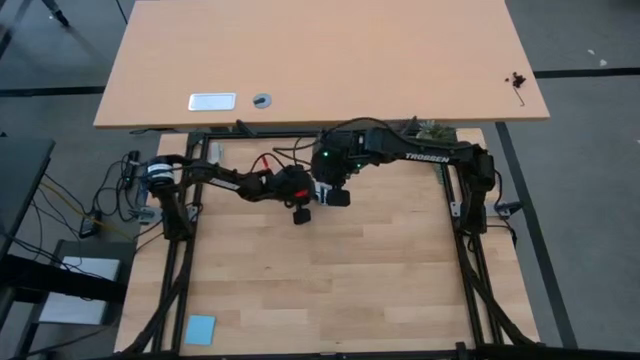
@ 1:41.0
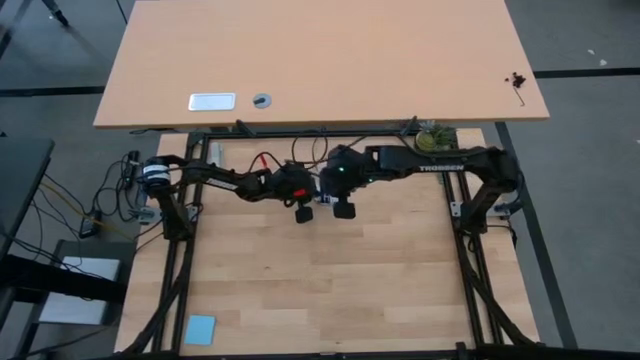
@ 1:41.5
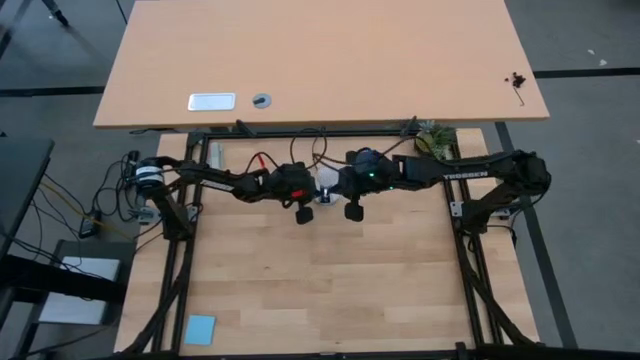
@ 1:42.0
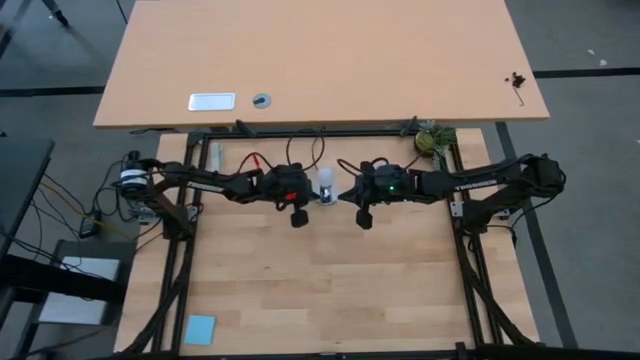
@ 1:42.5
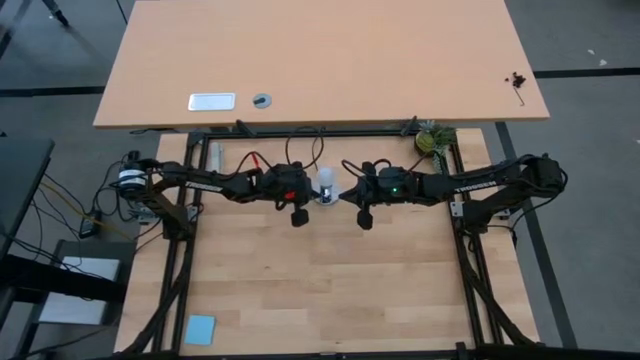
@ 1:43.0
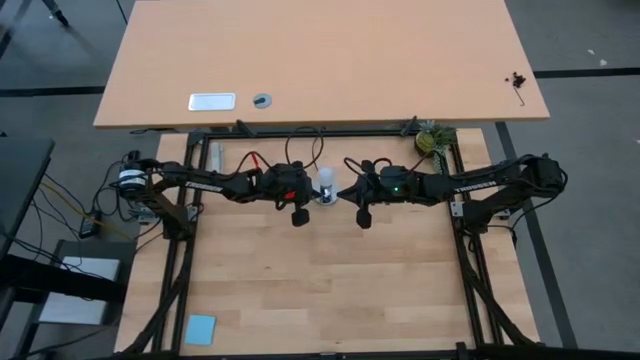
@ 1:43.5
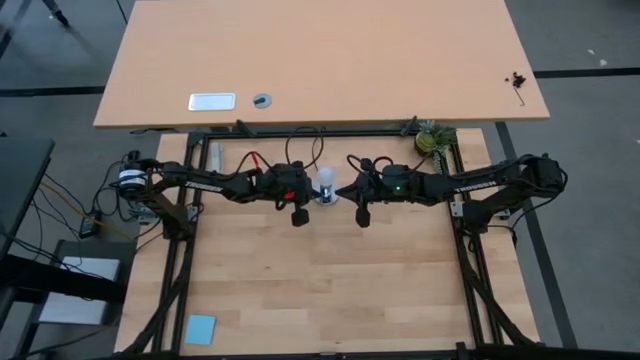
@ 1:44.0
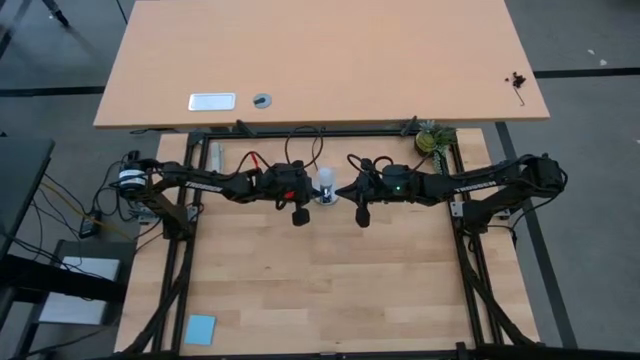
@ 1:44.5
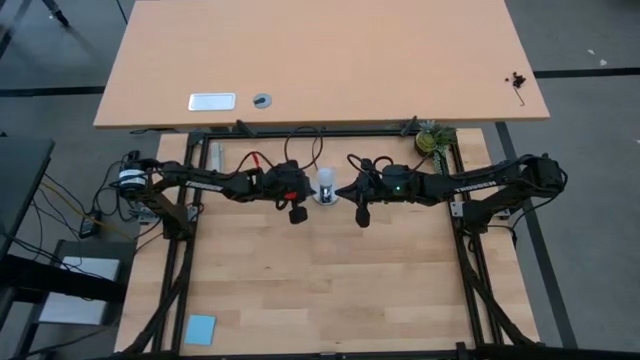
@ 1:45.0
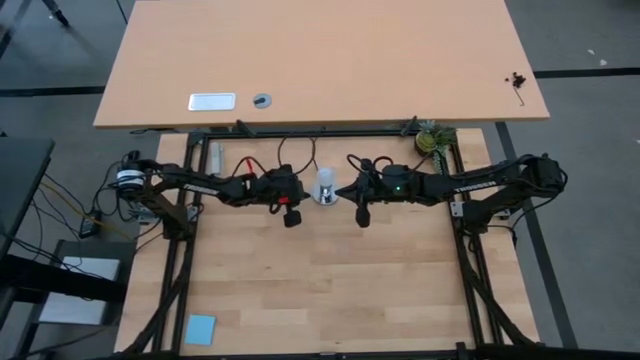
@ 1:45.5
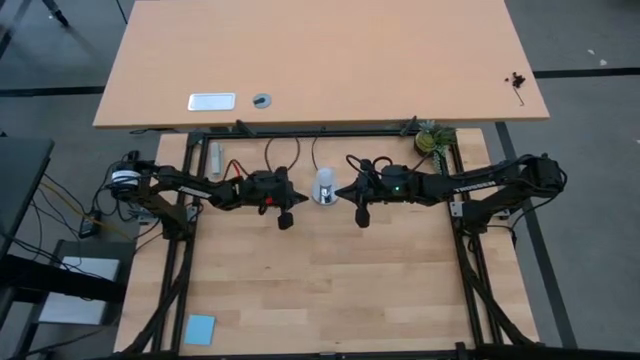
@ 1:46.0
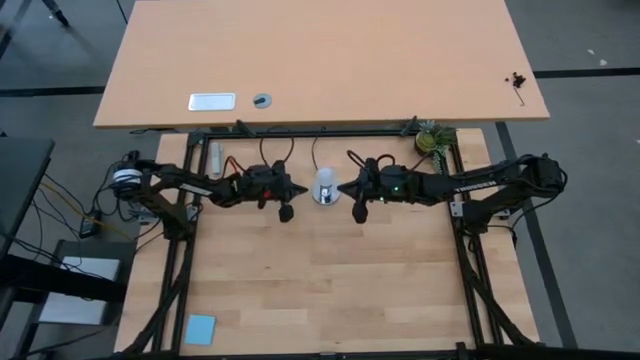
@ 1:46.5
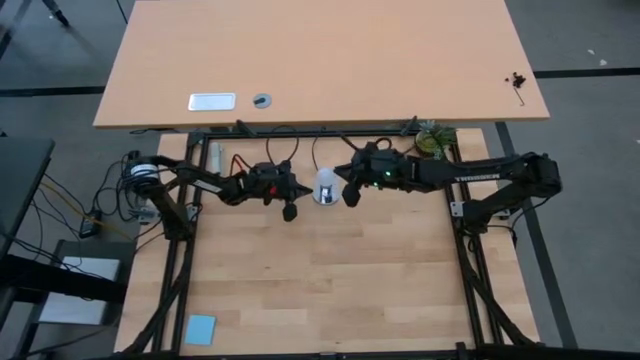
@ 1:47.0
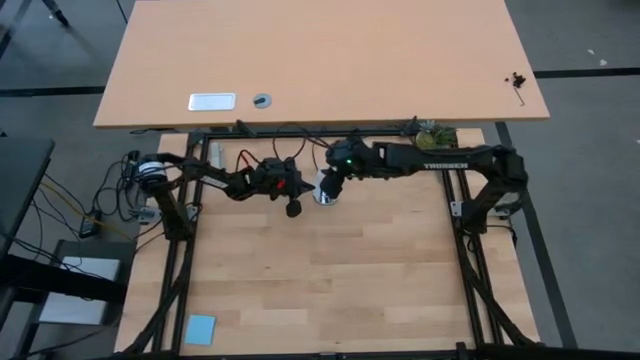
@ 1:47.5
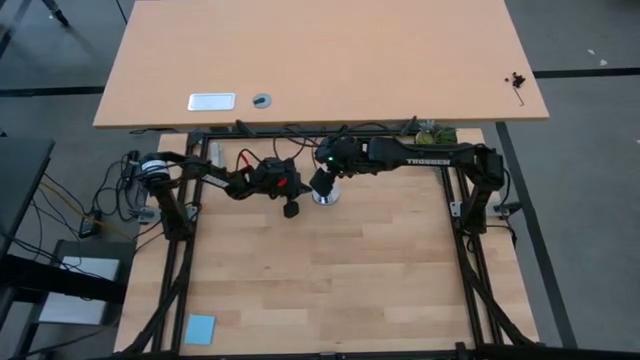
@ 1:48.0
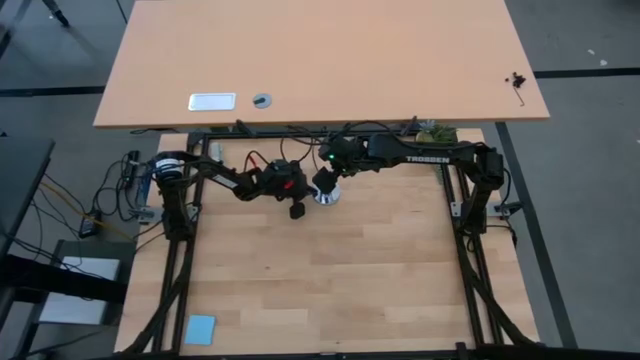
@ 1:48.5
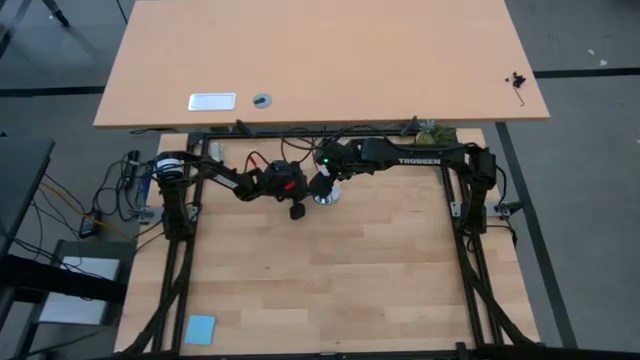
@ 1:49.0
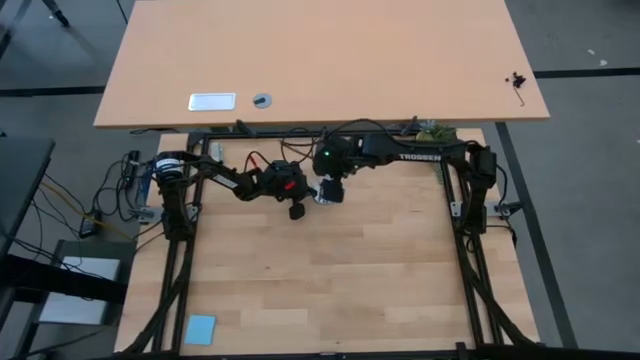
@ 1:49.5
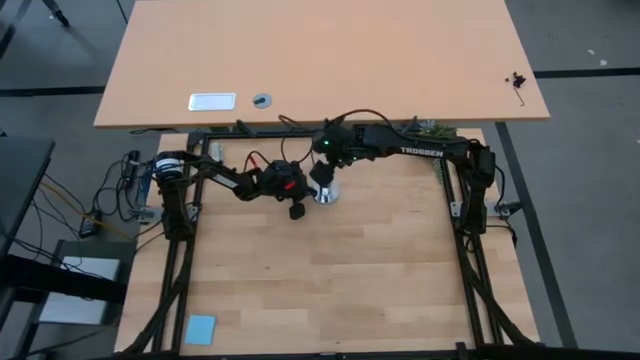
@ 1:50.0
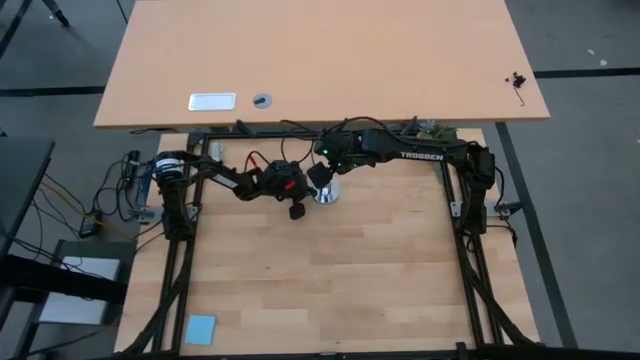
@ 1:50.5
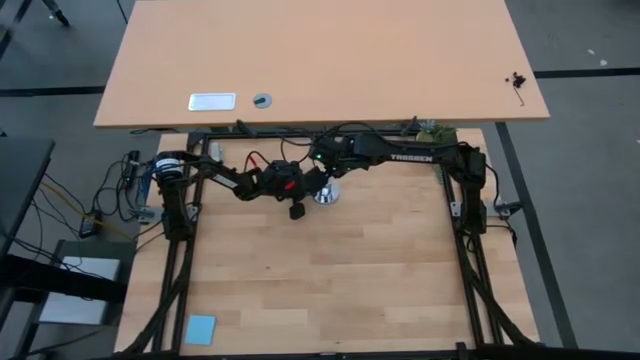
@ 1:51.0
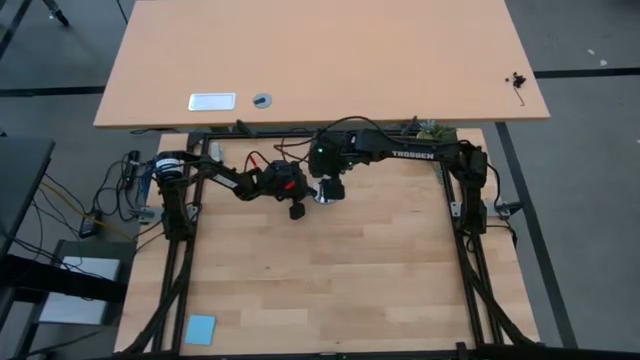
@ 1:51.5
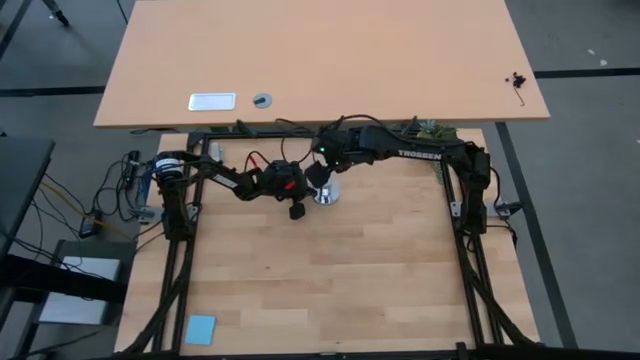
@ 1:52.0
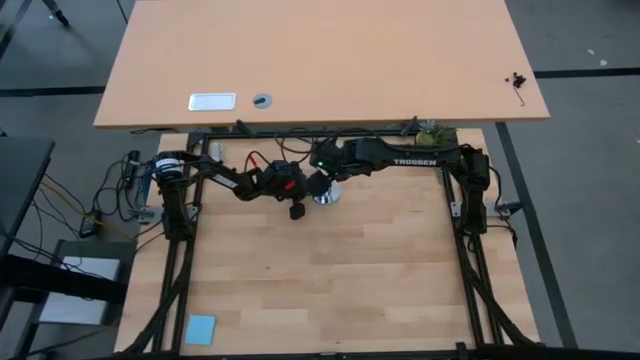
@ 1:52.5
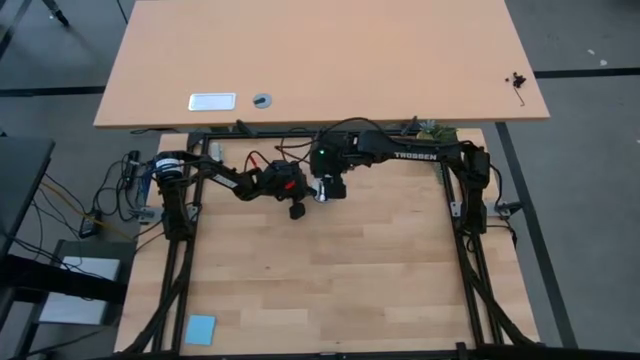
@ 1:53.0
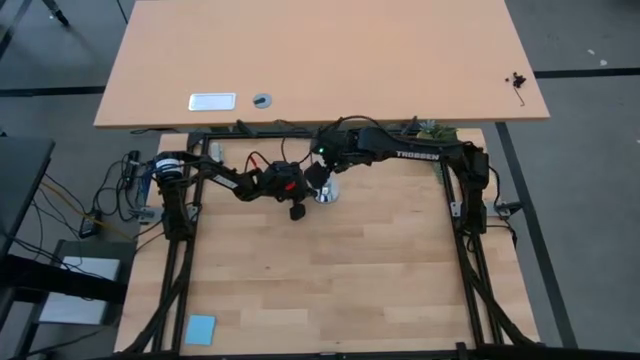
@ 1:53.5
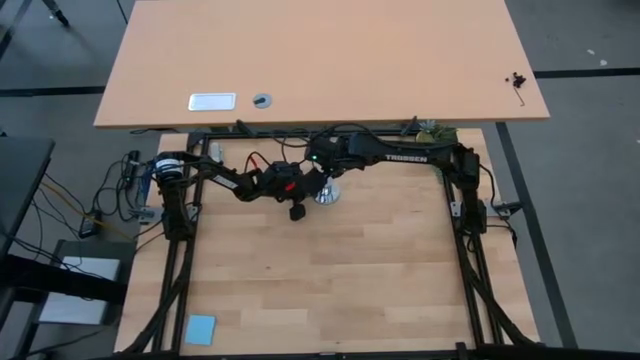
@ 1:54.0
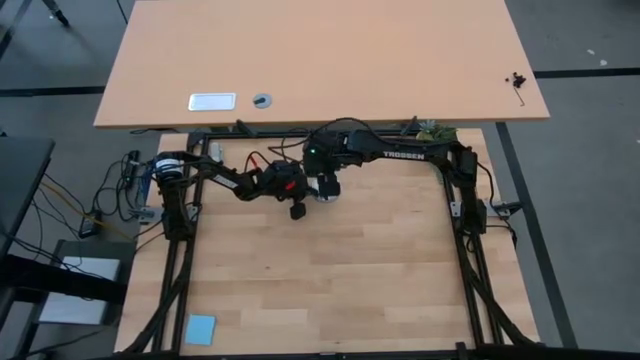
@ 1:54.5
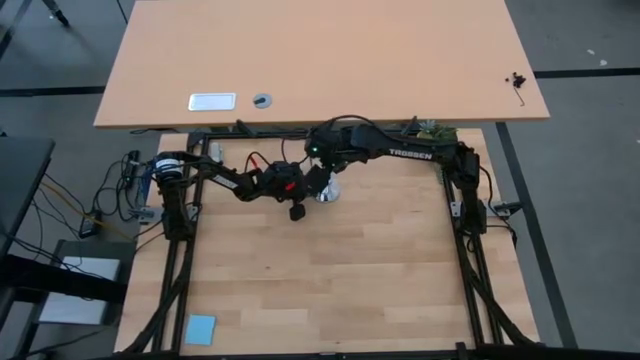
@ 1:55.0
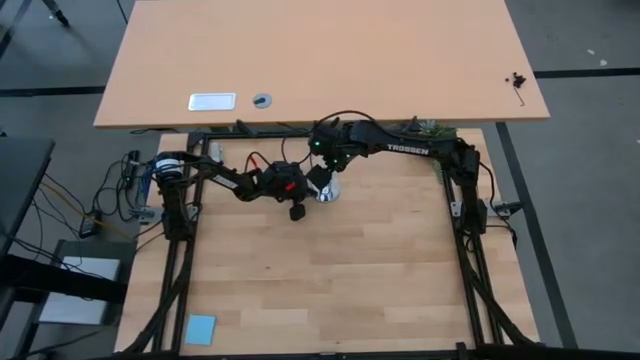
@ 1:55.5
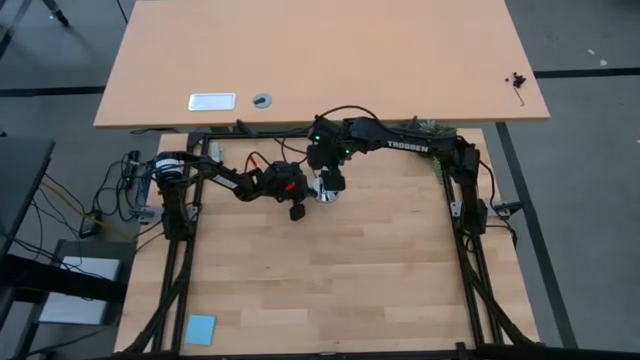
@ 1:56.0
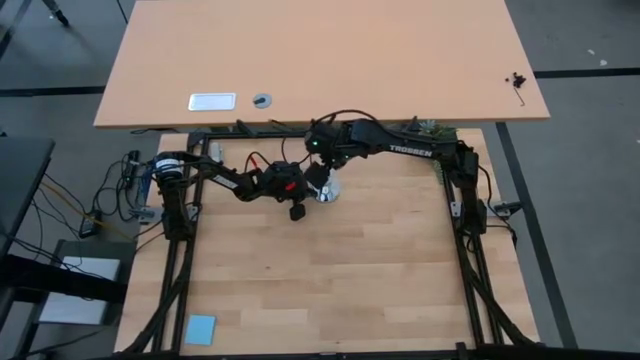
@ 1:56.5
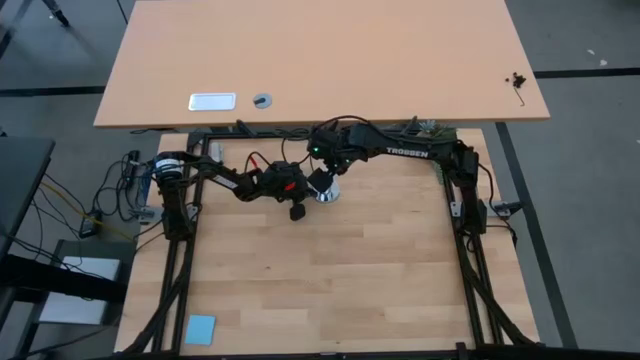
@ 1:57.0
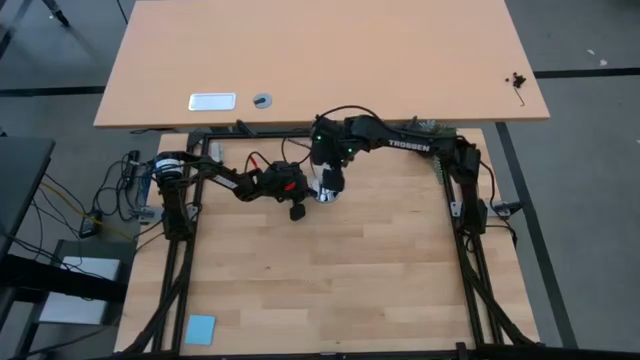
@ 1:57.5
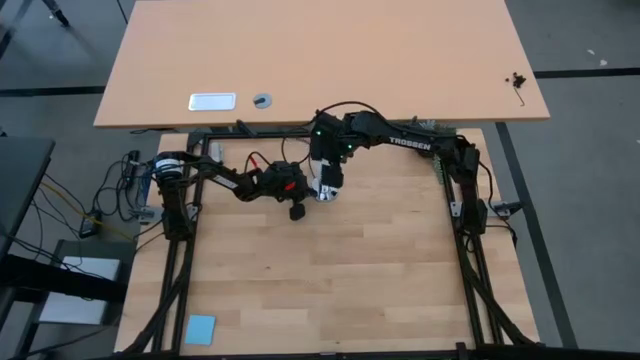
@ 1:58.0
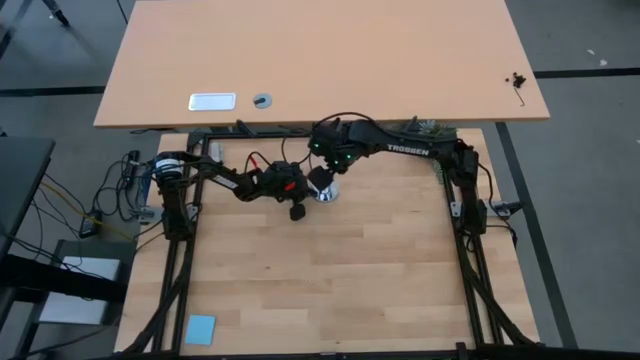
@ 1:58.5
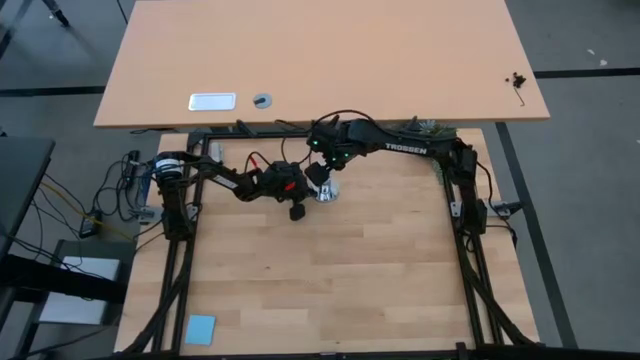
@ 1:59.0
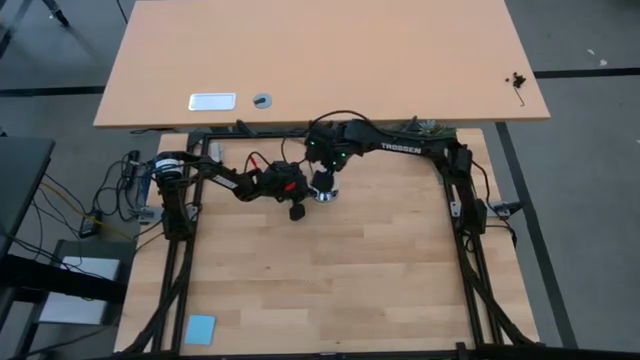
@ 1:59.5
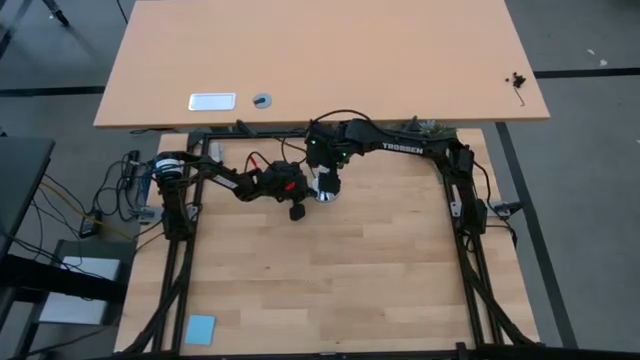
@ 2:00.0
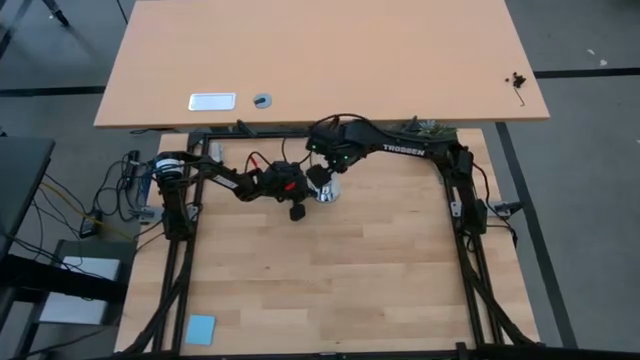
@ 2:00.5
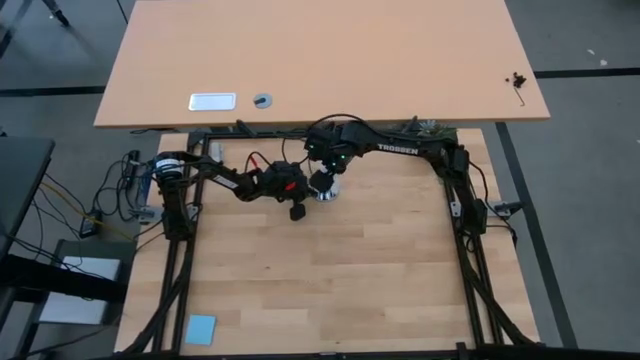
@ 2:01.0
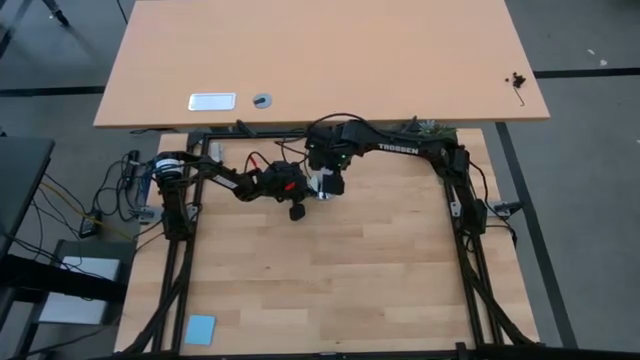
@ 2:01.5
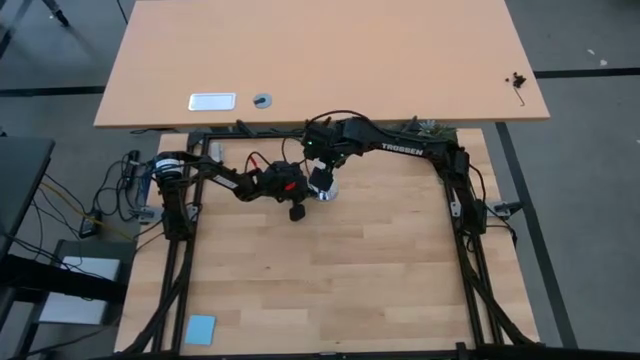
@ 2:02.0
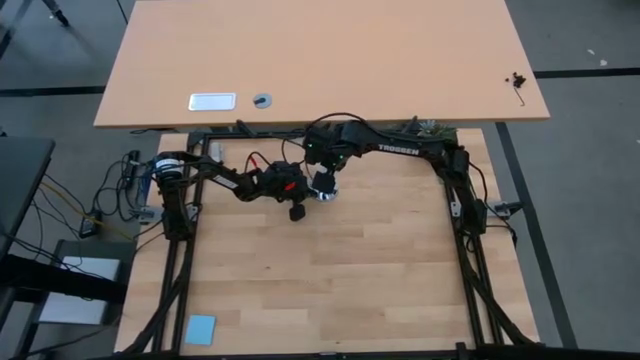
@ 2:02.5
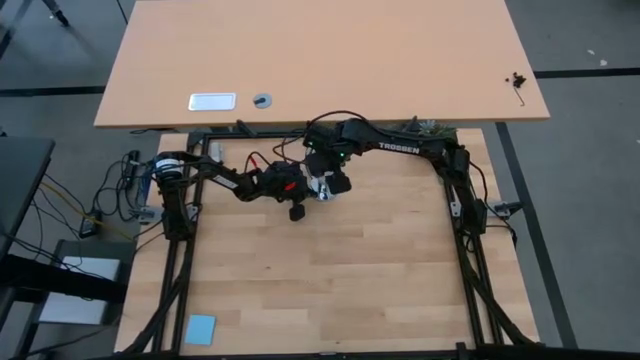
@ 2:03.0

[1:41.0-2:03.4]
Task: Screw lightbulb
Remove the lightbulb from the lamp
